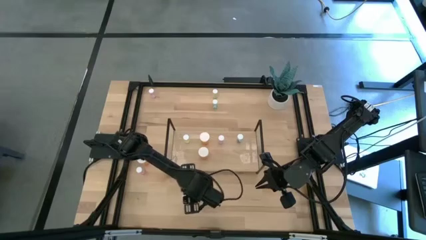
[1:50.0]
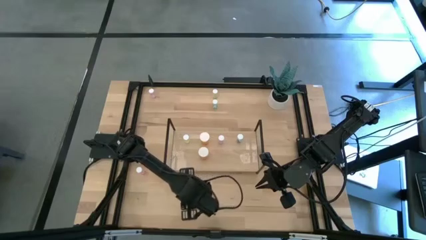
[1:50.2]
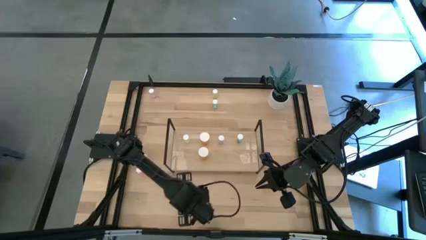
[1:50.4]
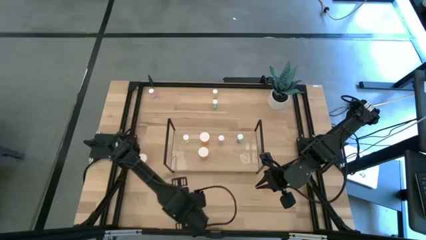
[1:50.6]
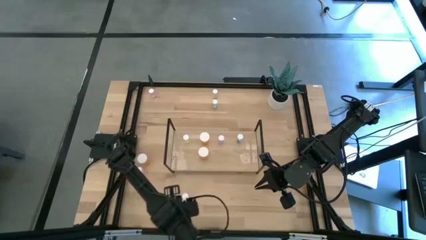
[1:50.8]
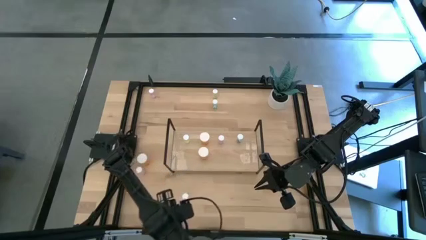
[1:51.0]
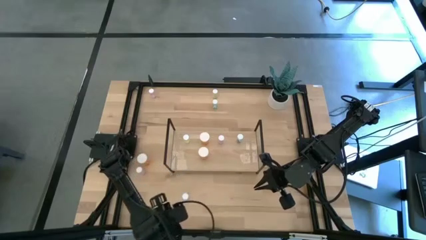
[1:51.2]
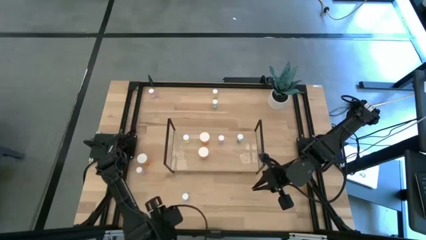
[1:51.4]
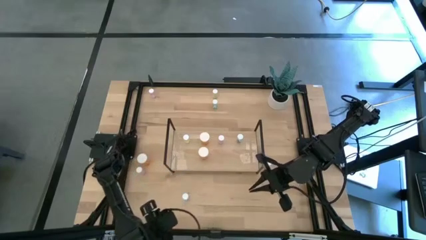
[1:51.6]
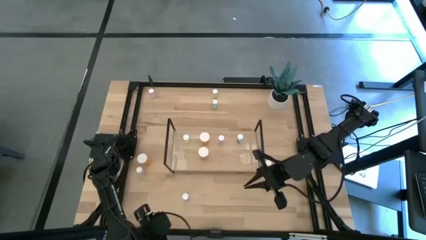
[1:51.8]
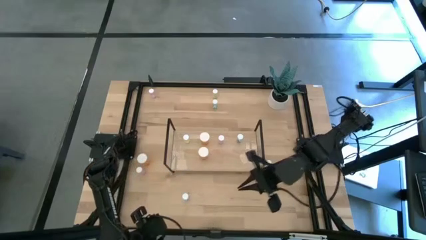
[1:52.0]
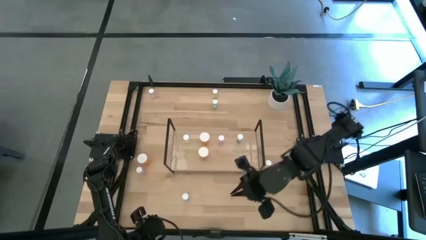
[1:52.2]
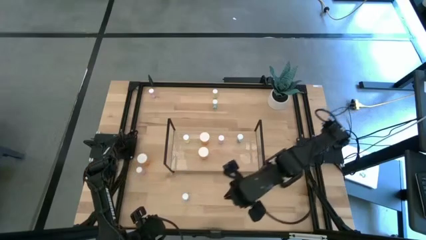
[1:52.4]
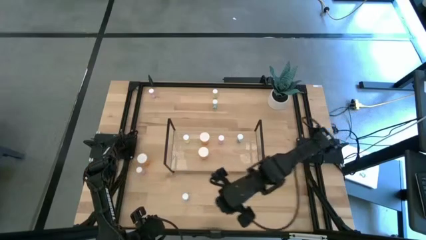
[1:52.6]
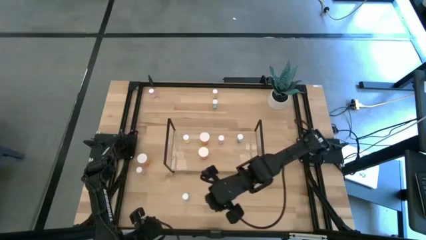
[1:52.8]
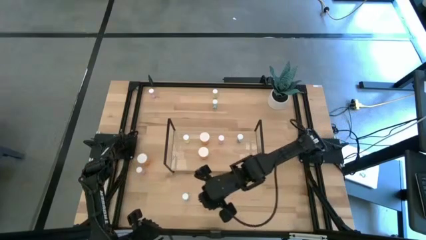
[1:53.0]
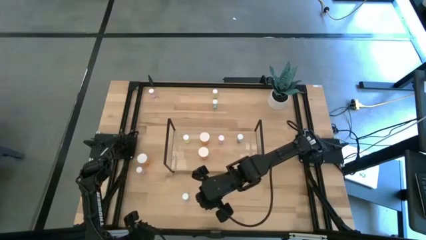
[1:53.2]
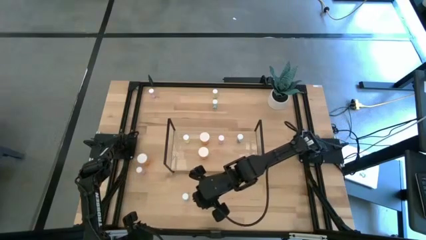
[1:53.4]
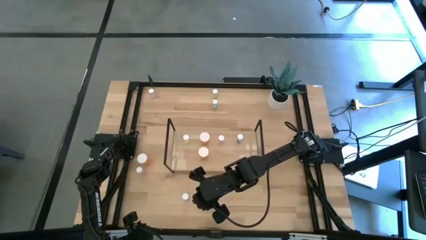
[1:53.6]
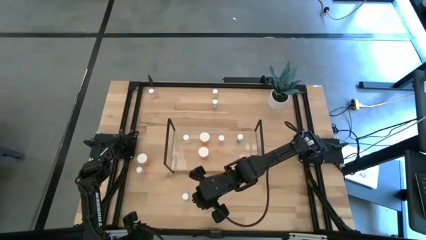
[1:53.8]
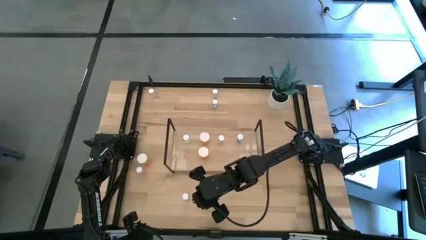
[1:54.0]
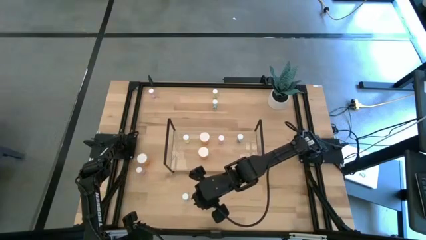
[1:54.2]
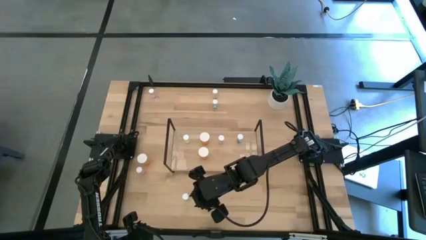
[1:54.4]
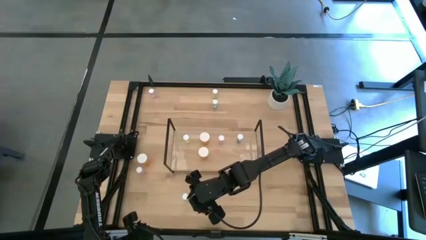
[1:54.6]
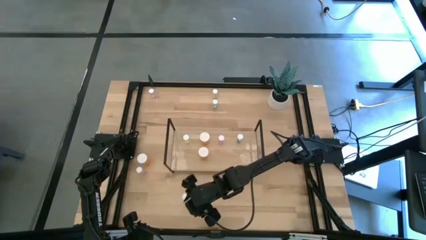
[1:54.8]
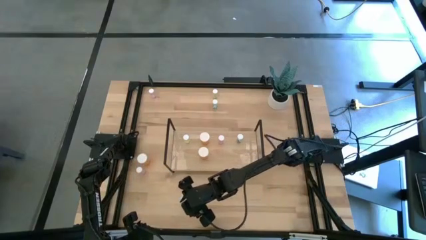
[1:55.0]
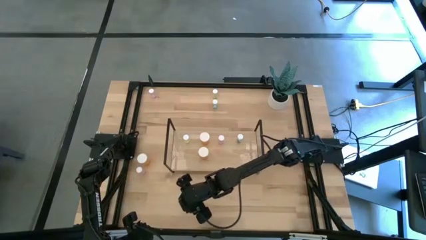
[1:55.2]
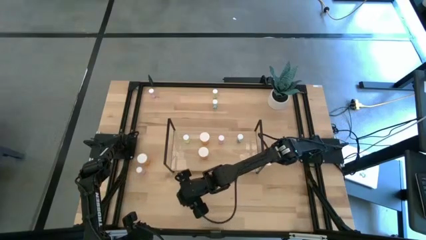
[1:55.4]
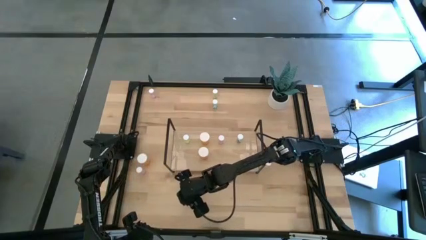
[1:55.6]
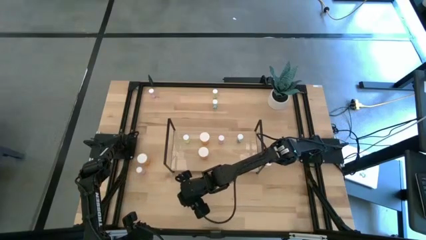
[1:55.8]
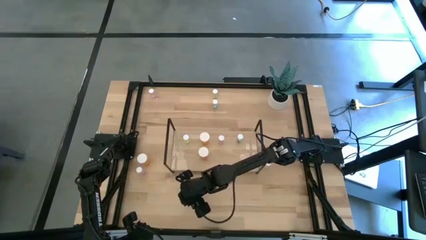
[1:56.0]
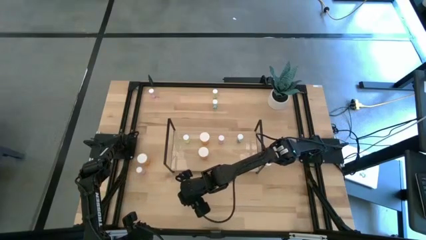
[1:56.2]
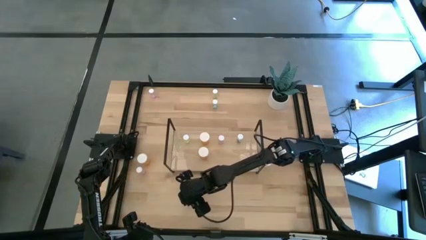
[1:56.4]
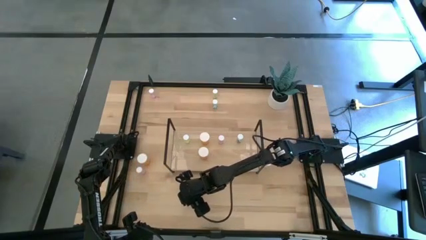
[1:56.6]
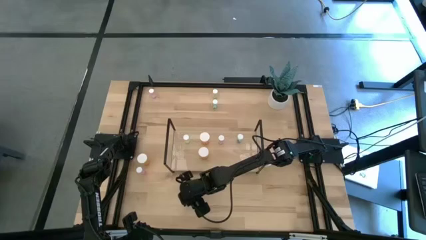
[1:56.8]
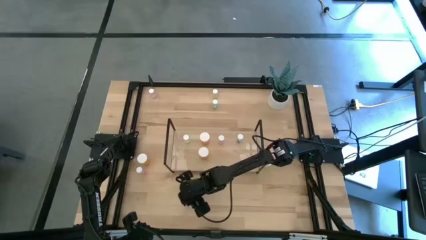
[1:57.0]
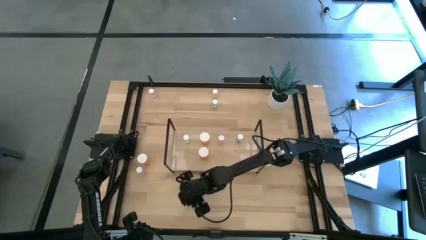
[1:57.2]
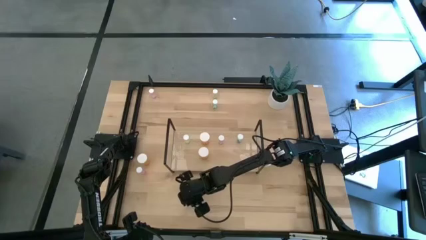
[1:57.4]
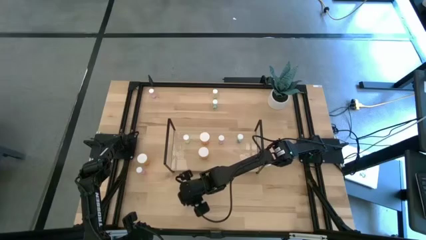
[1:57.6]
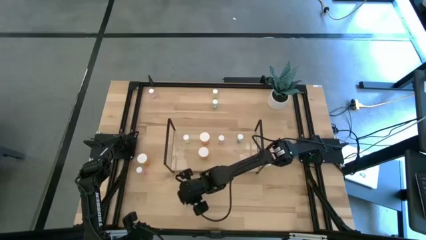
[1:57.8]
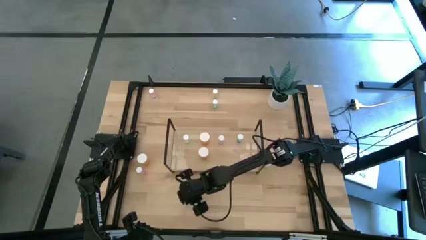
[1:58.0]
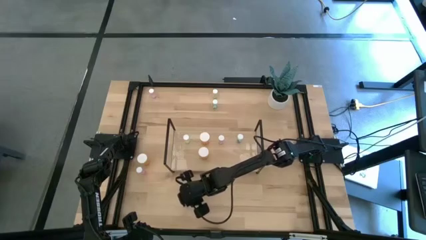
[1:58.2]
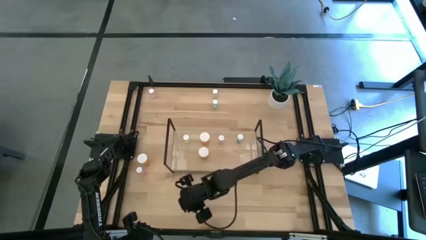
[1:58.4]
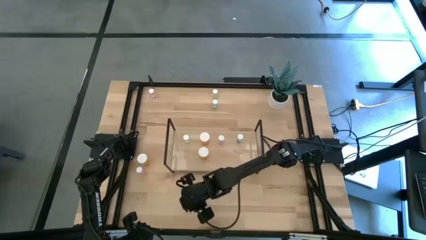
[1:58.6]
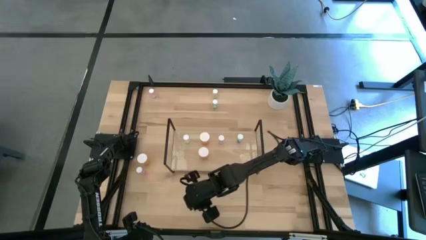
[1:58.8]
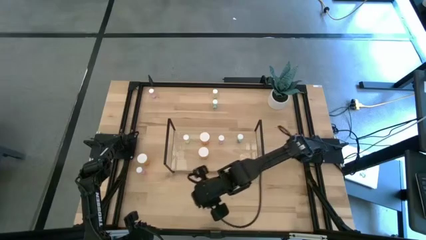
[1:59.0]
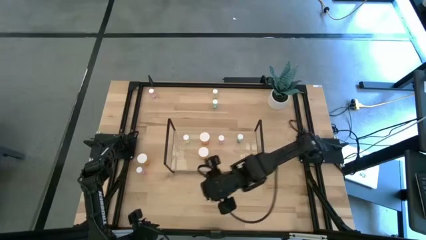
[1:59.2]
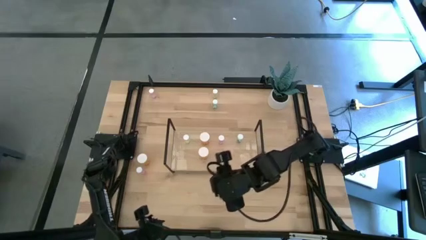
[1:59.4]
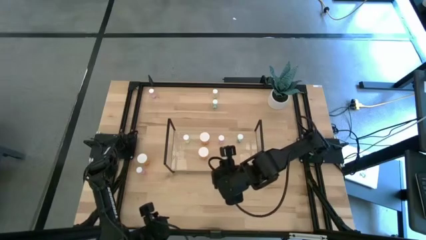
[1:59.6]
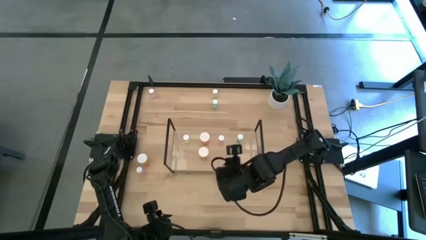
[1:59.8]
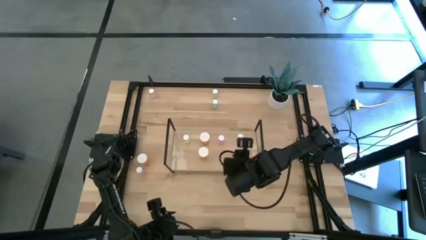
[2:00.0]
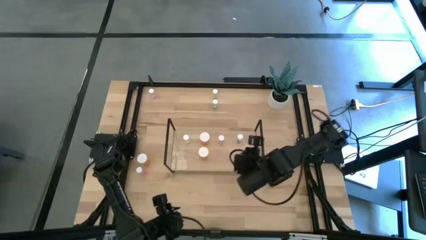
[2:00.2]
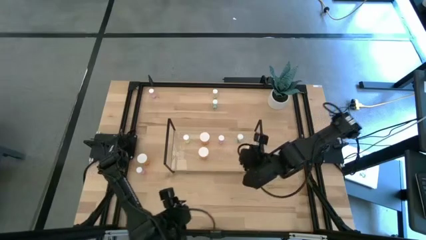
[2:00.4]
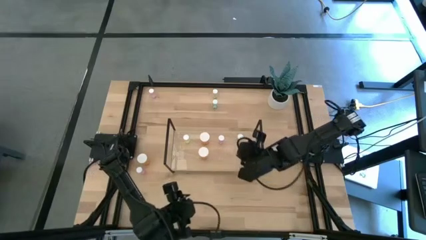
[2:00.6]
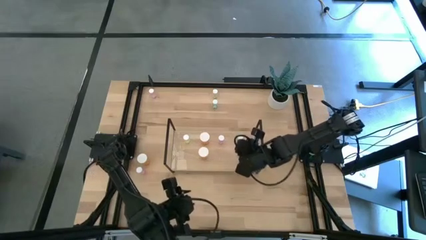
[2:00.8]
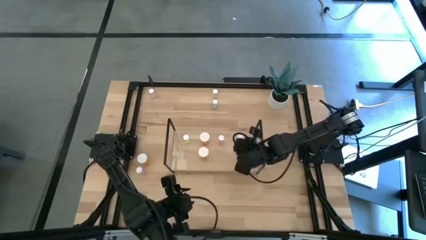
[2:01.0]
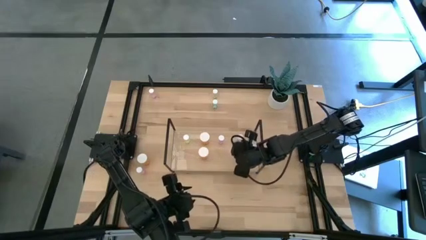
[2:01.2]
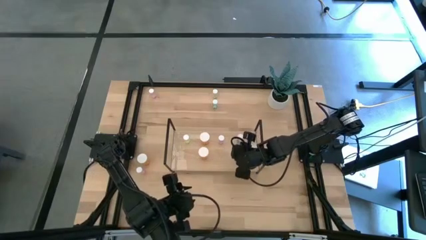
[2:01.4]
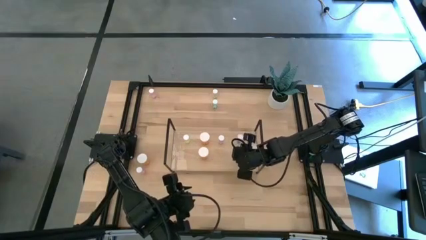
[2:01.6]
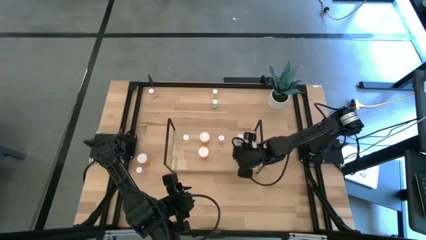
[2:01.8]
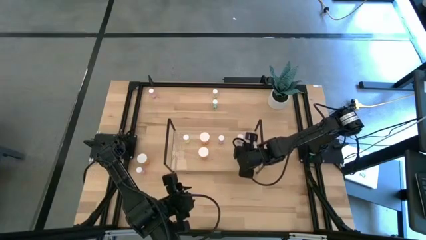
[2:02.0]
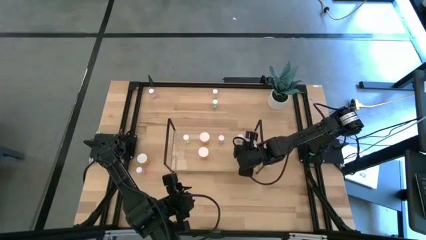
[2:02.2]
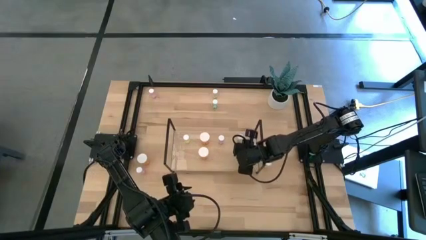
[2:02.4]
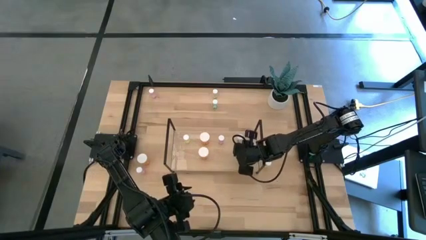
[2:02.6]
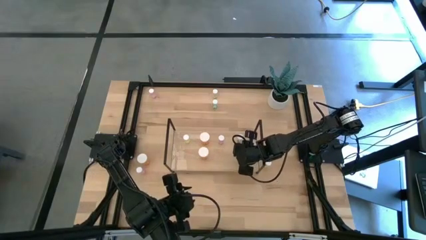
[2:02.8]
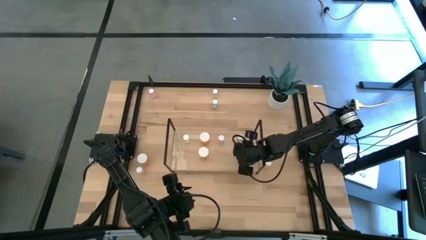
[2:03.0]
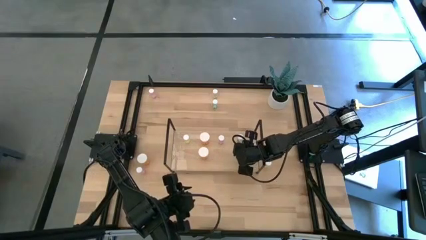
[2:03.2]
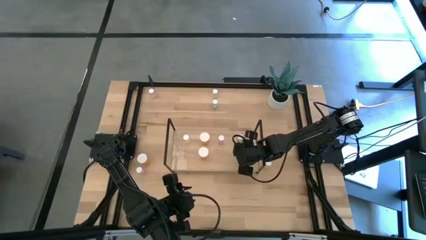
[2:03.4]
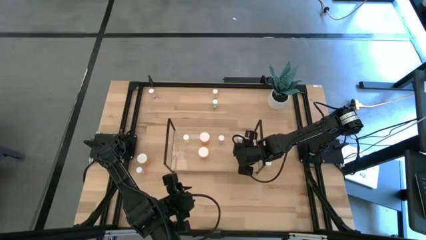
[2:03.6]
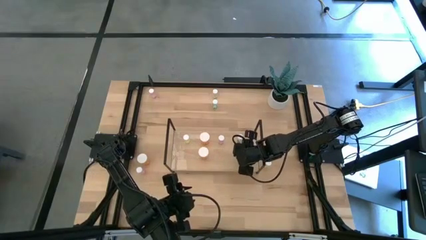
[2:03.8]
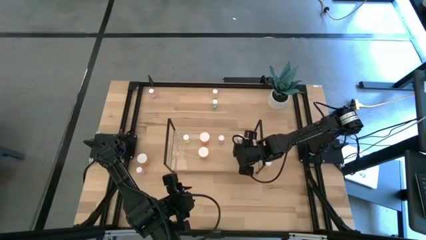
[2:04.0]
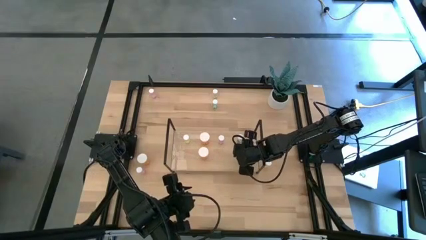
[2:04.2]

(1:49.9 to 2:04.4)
Task: Pick and place medicine bottles onto shelf by color
Put the bottom blue pill bottle aligned with the blue pill bottle on the shelf

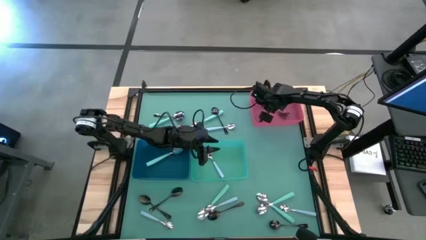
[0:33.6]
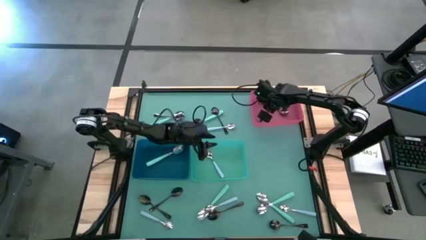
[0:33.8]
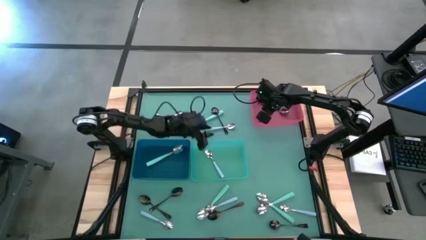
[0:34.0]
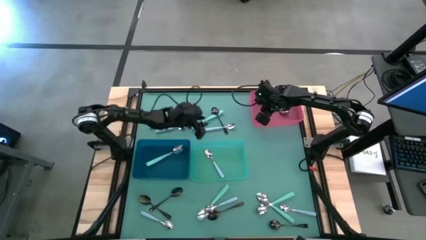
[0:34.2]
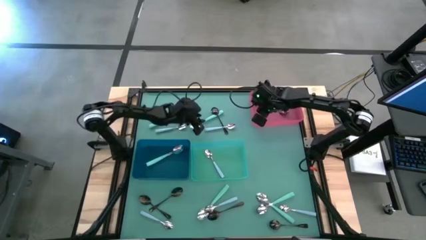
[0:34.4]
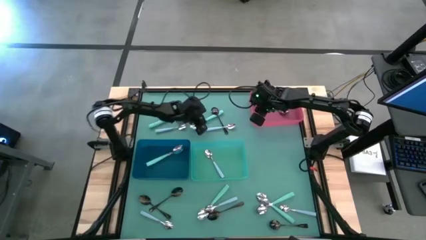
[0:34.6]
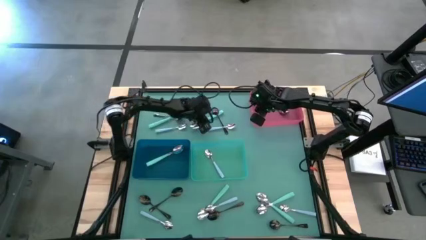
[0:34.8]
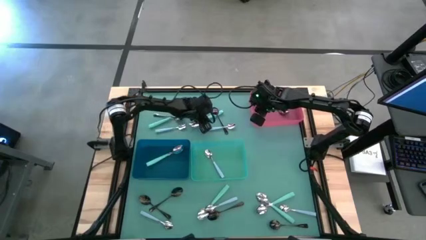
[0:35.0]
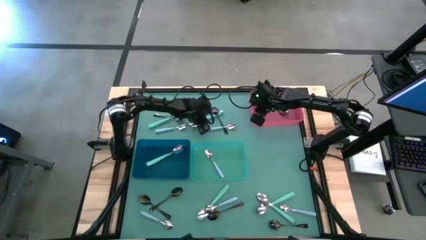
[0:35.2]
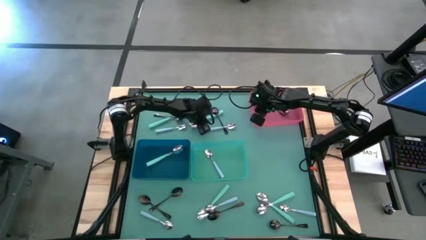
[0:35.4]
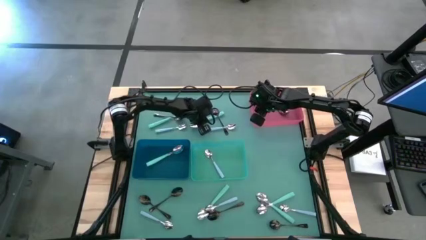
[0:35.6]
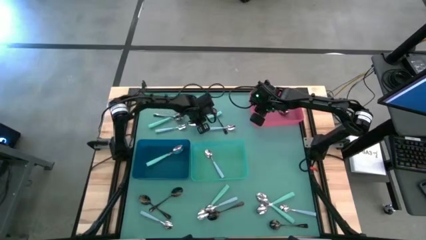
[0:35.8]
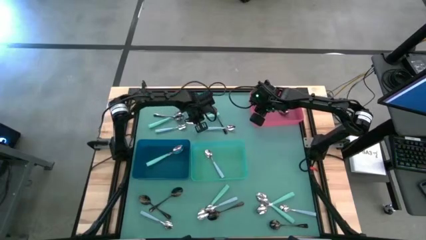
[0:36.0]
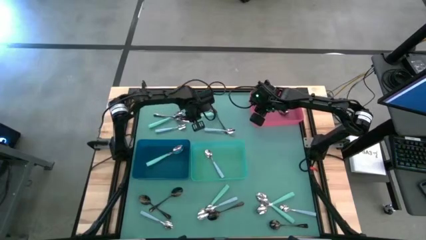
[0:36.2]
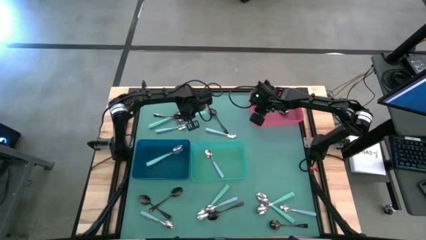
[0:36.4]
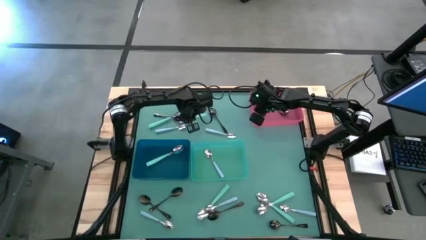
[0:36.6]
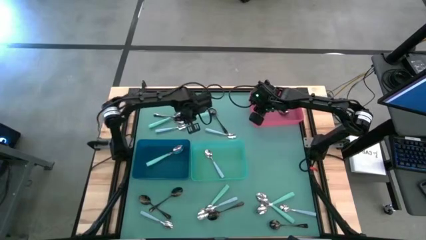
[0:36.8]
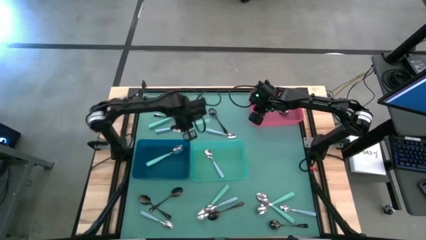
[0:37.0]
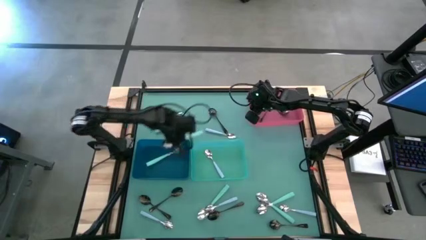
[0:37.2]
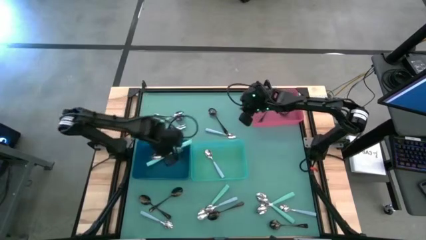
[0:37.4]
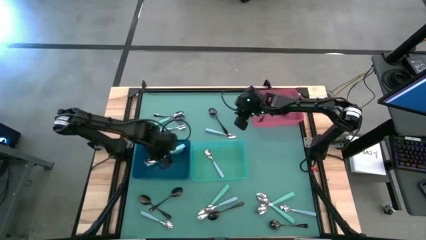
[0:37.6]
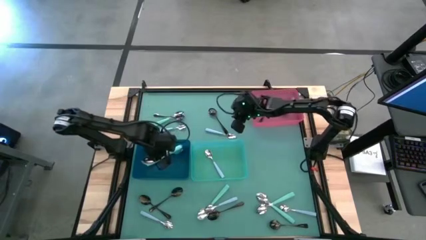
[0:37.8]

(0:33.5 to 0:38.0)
Task: Sort silverware by color (type)
Put the green spoon into the blue bin
